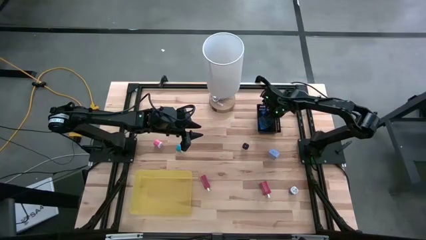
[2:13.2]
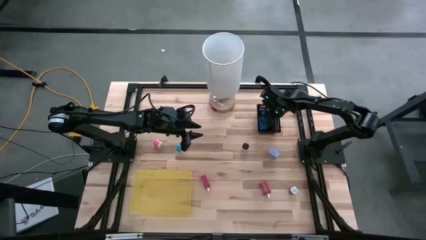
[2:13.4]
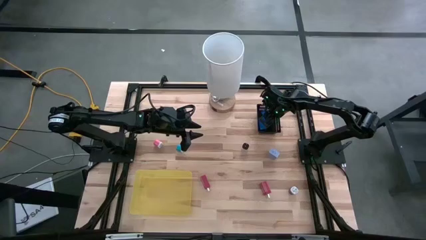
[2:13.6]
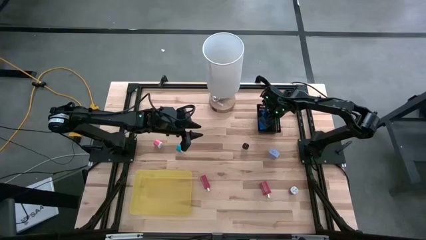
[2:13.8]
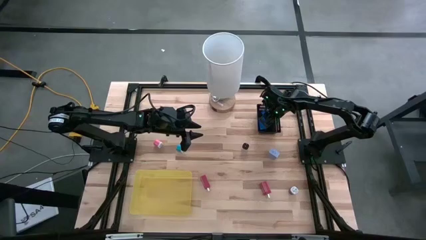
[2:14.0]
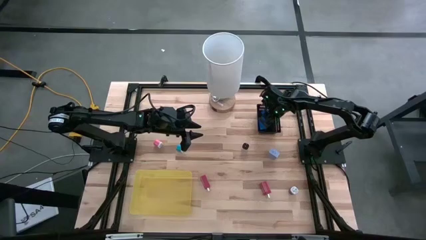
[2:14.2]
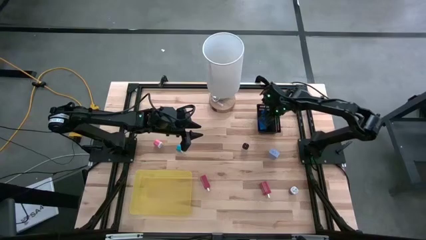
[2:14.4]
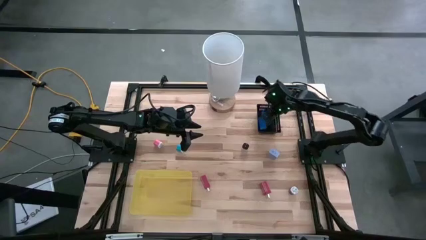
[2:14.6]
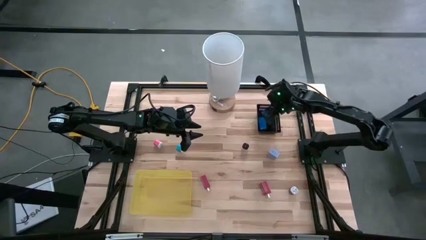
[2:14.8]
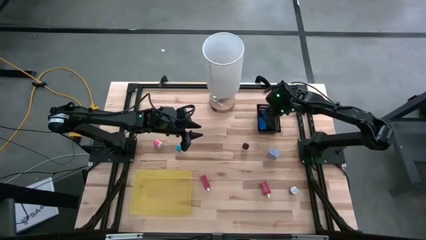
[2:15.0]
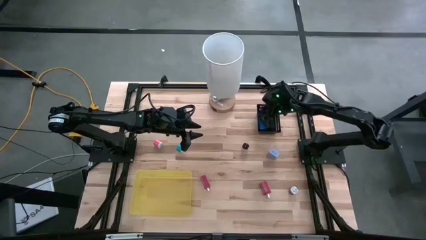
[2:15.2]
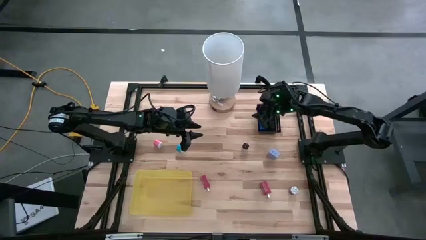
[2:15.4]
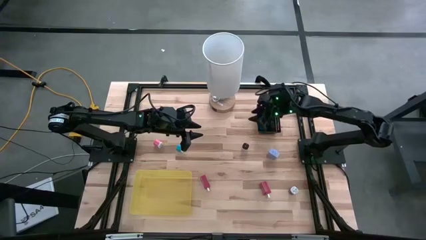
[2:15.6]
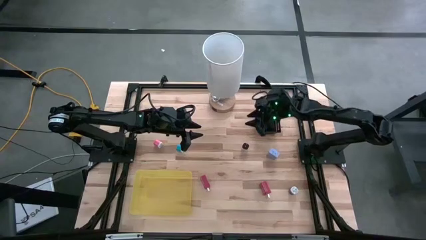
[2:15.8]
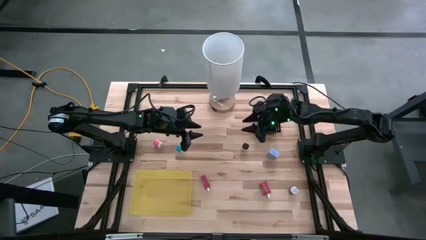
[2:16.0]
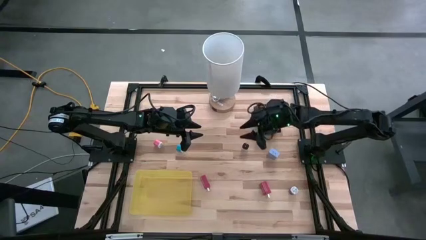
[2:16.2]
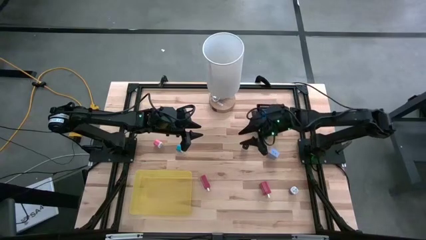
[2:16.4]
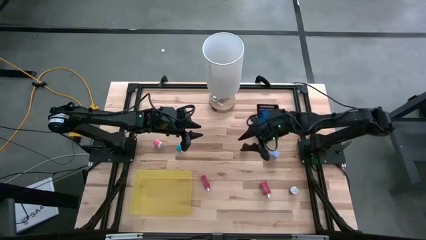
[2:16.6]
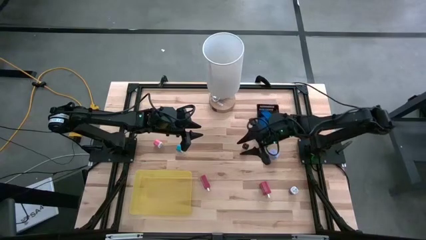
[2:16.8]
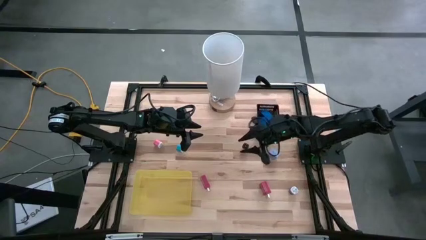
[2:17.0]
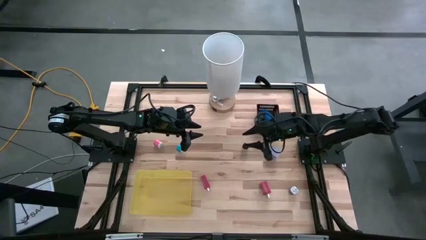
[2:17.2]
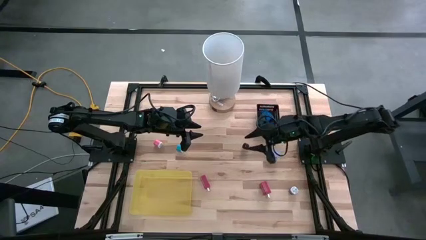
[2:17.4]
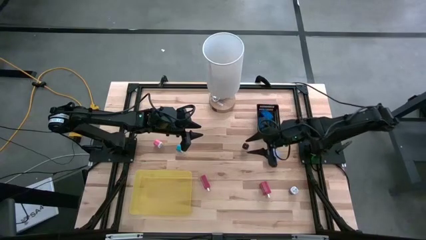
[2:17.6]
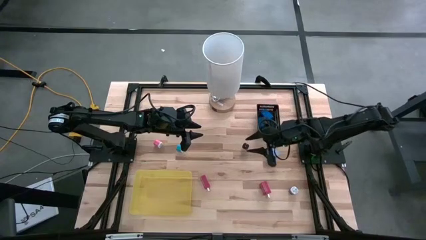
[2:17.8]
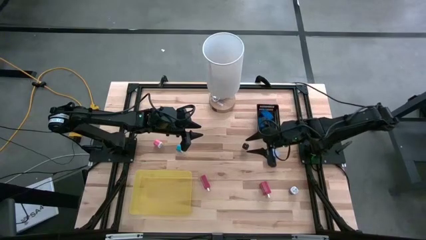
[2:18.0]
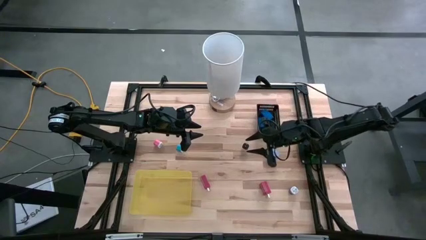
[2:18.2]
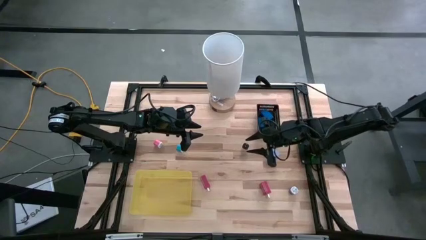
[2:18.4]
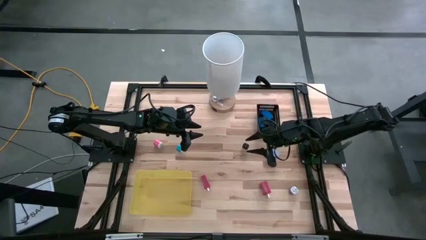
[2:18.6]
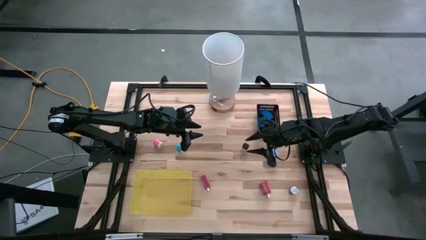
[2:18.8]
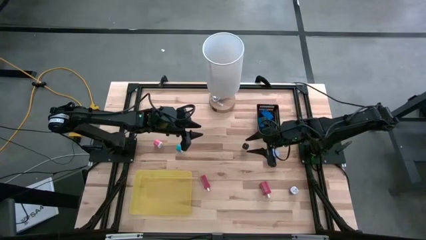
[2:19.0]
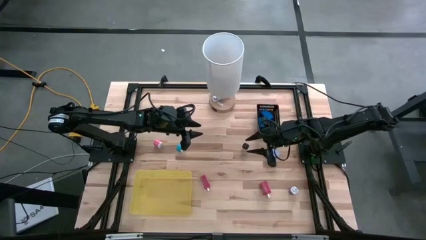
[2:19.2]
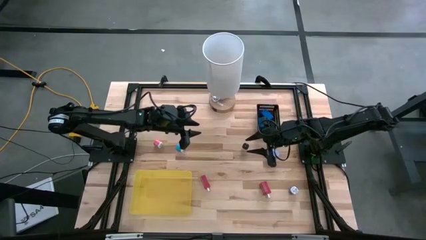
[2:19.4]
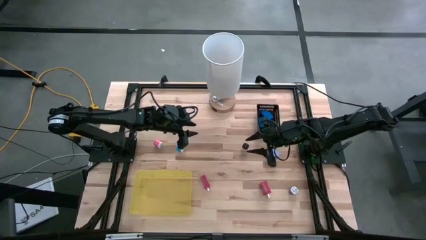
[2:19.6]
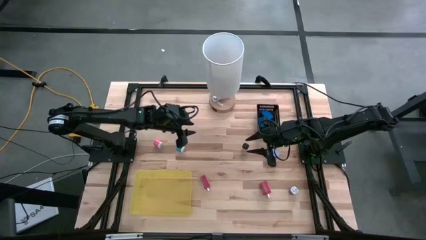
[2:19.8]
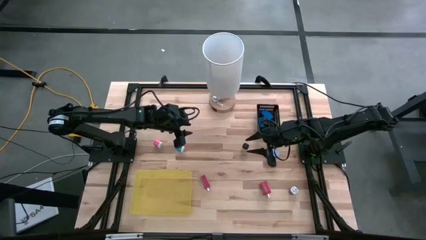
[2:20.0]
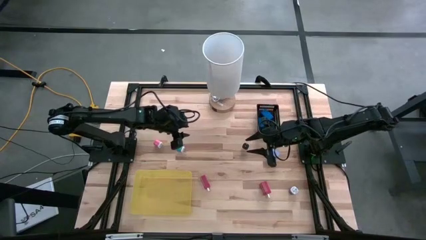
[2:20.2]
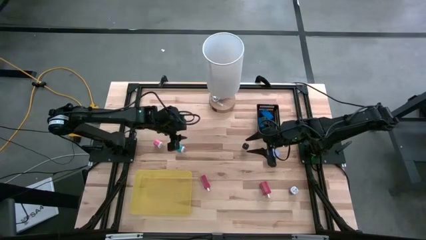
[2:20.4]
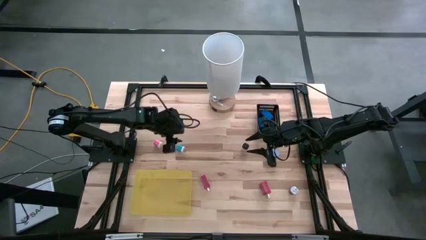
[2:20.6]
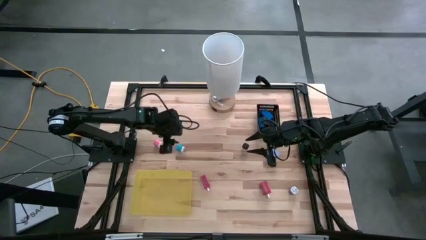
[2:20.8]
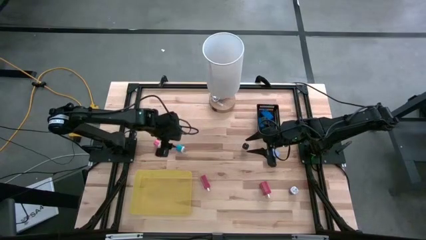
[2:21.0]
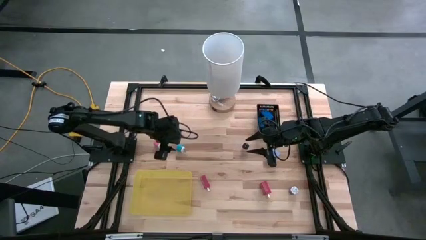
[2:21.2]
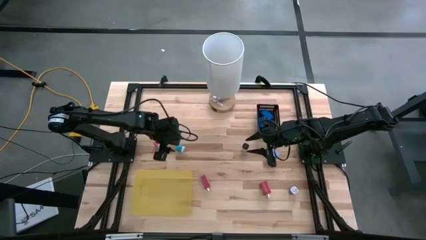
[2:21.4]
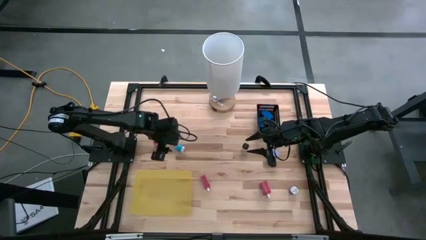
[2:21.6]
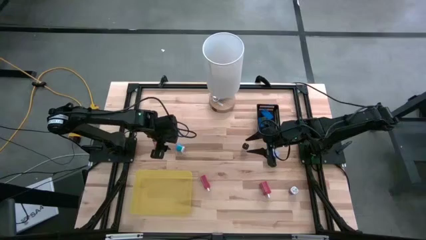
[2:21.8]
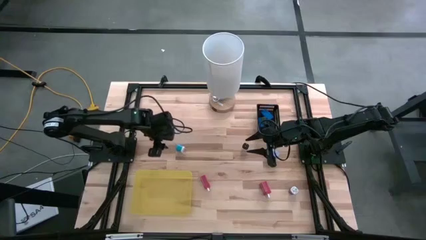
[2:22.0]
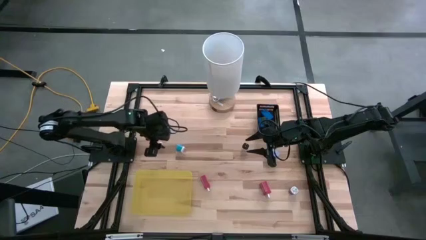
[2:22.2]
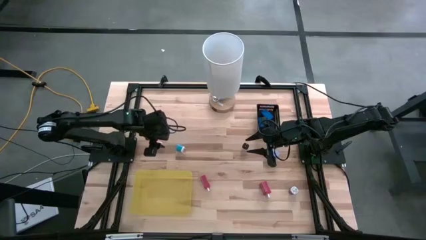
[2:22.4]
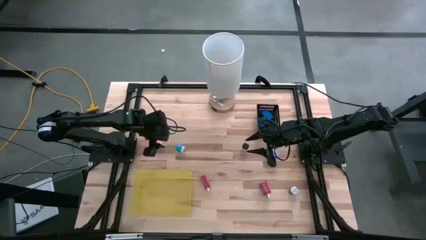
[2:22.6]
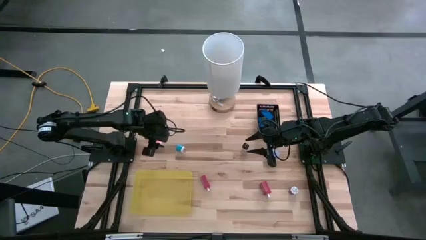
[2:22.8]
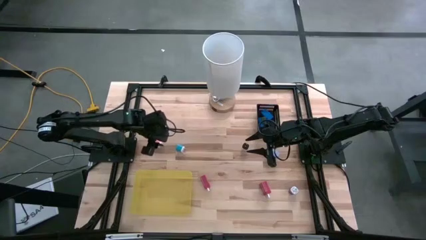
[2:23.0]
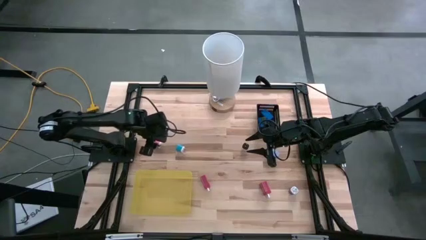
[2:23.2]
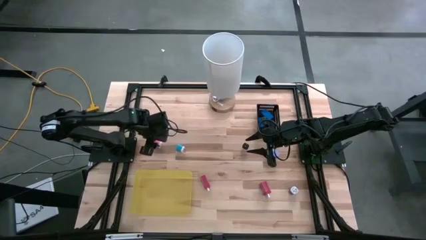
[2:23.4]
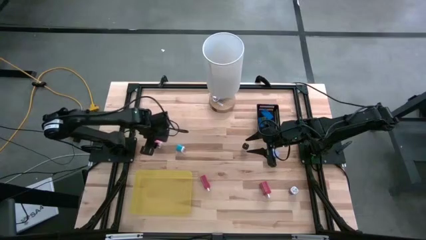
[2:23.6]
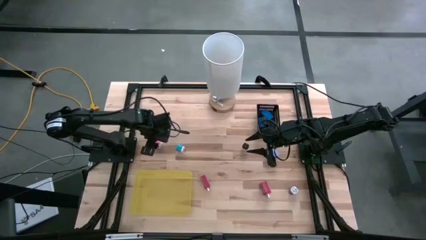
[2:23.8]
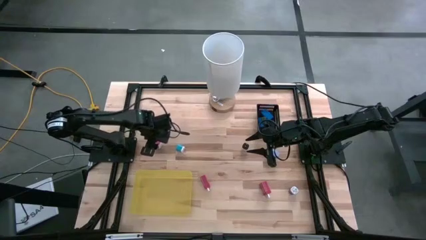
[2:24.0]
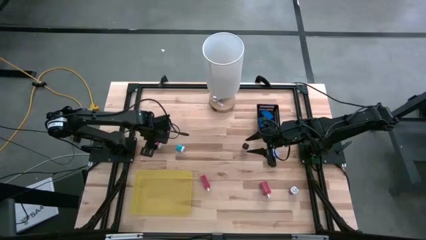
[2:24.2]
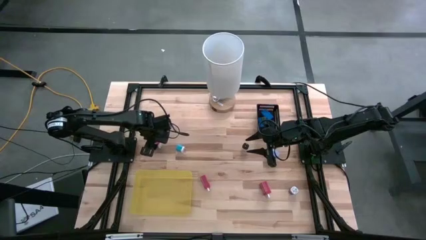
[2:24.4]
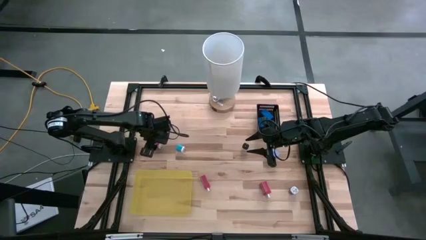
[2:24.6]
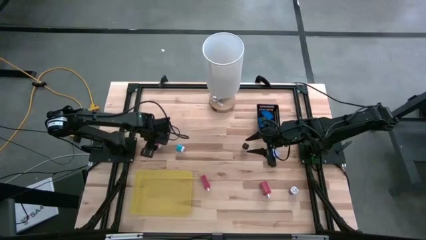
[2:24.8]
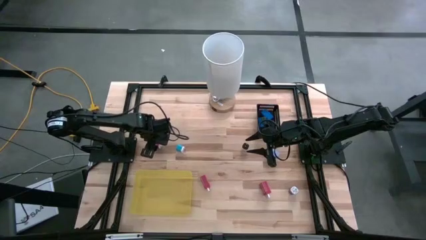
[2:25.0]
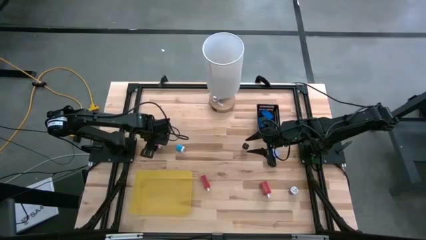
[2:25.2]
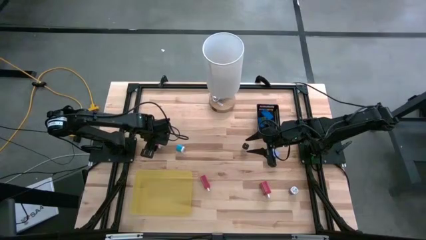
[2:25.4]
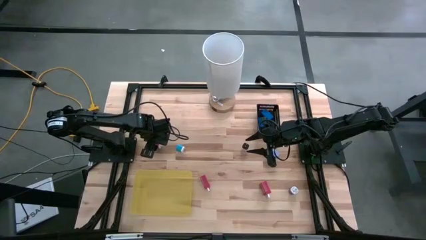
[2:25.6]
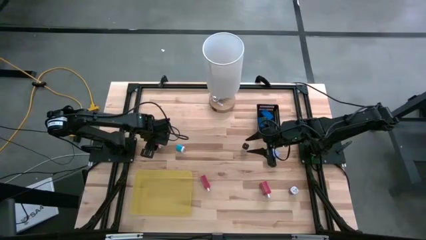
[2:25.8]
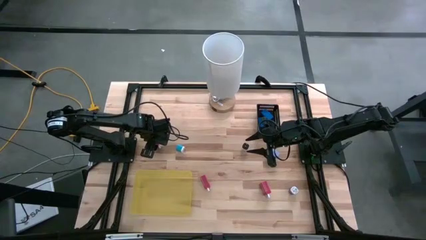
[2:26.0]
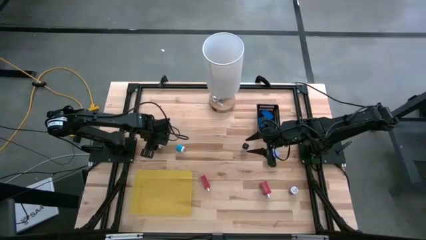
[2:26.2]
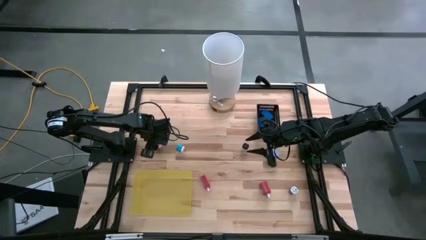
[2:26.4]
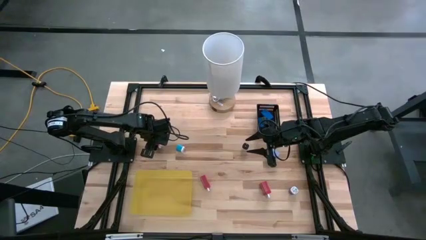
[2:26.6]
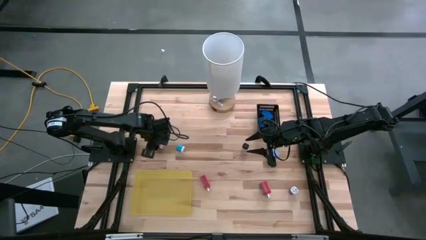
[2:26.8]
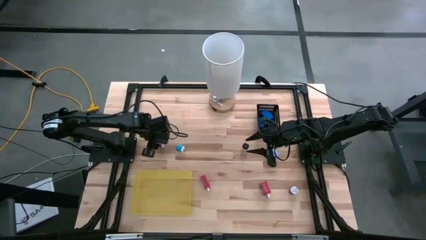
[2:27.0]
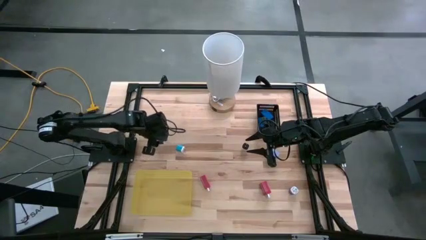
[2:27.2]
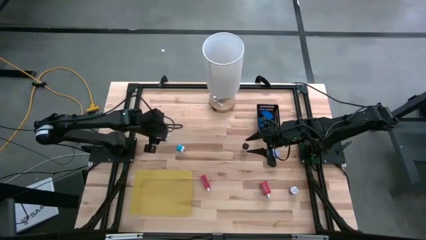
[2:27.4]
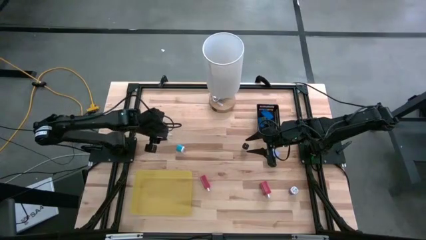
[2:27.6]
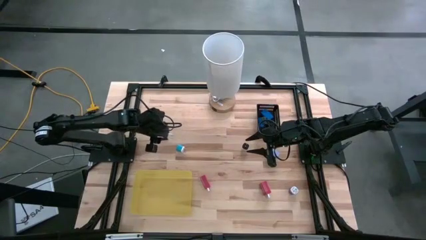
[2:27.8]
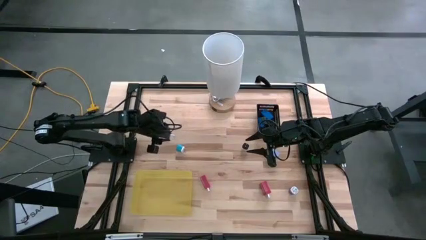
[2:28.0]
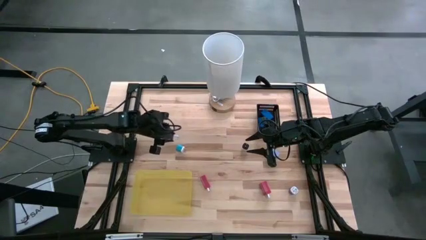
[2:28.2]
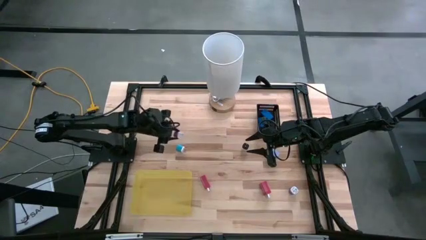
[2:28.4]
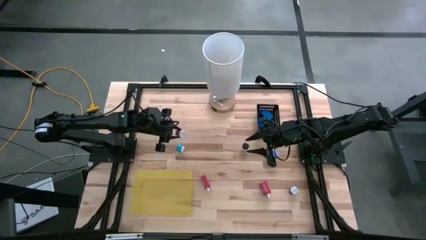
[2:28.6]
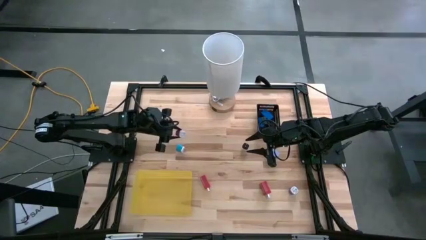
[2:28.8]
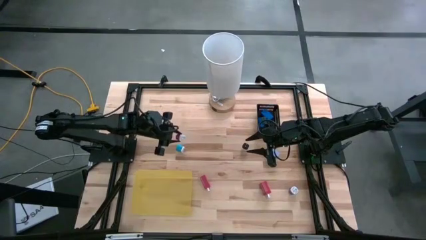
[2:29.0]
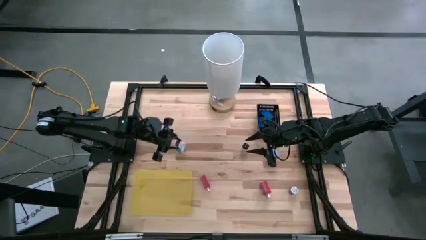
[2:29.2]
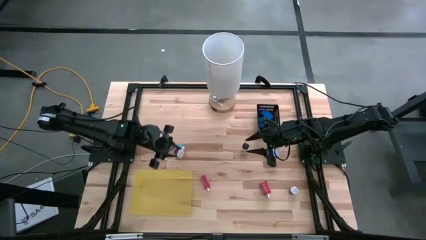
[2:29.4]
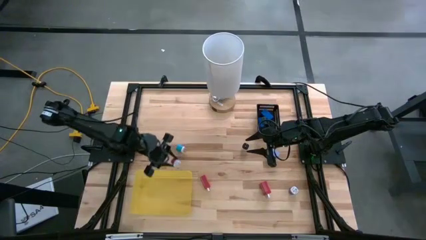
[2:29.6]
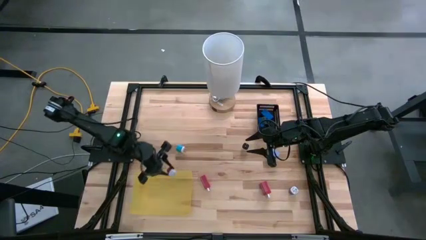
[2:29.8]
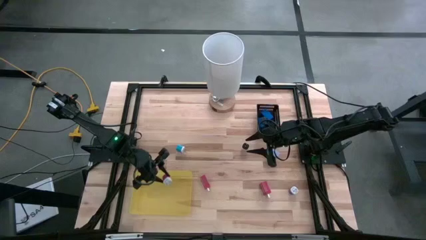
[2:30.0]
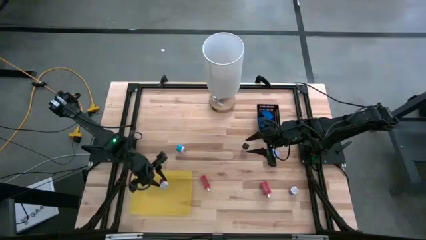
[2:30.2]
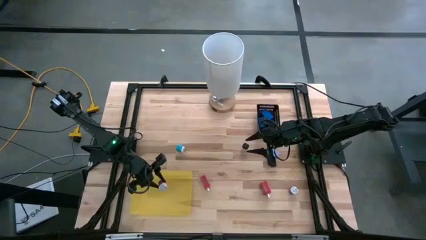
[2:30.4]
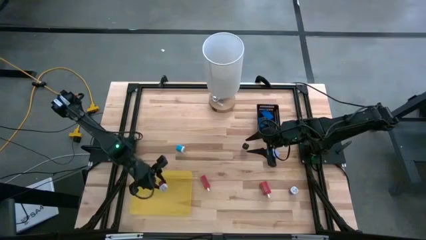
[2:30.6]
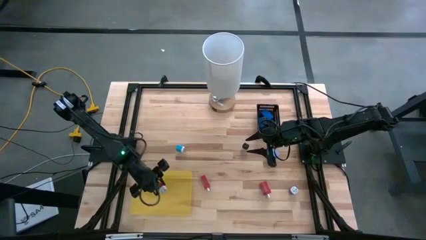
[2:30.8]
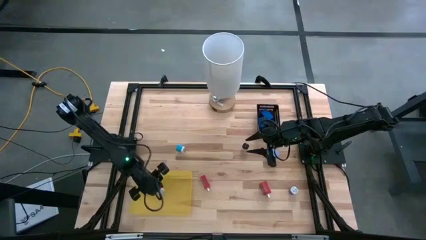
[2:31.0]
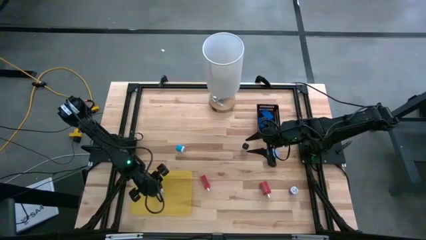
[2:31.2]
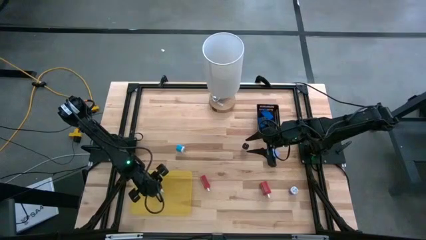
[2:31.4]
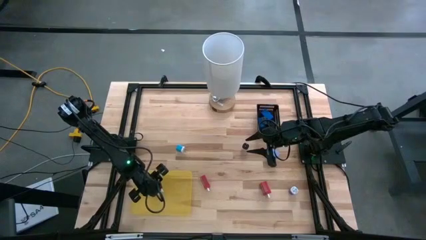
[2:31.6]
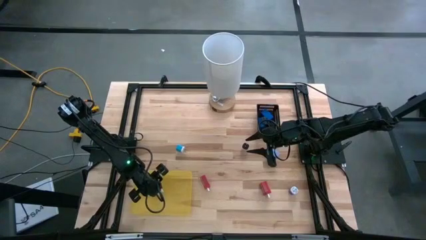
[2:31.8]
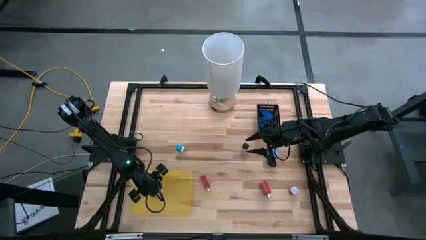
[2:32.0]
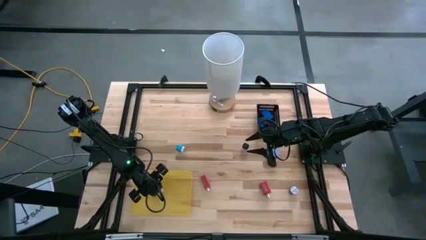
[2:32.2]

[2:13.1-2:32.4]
Task: Pick & Place Office items
Put the pink charger adapter into the yellow bin
